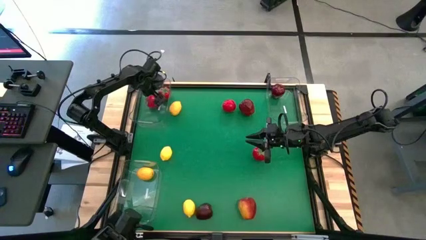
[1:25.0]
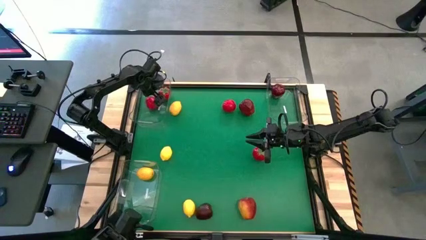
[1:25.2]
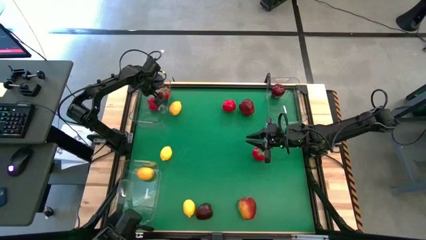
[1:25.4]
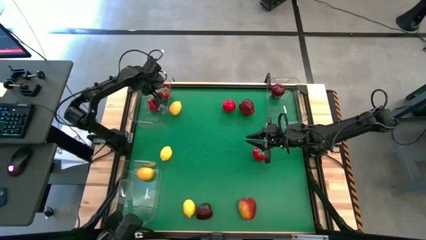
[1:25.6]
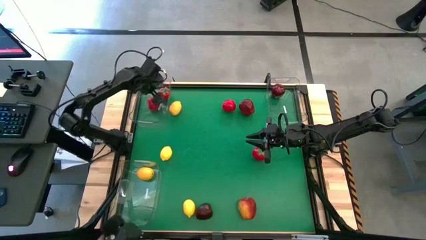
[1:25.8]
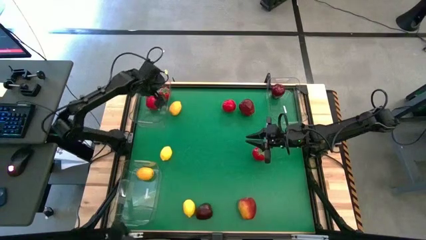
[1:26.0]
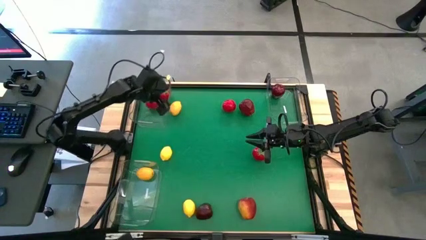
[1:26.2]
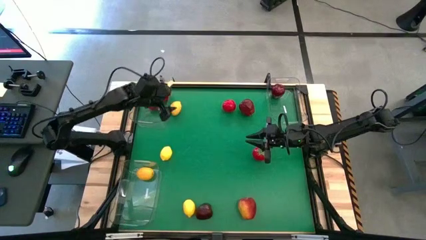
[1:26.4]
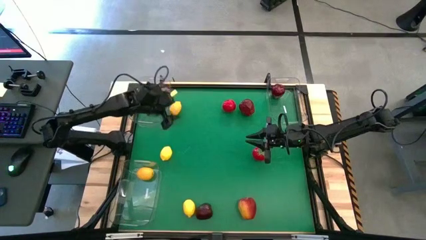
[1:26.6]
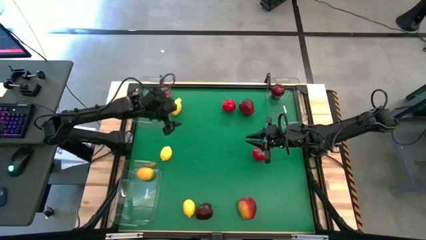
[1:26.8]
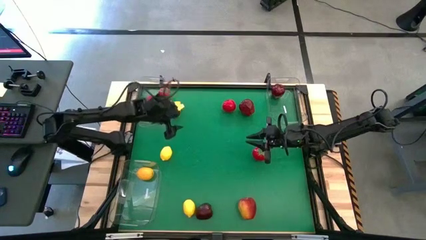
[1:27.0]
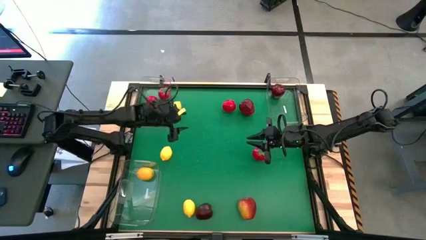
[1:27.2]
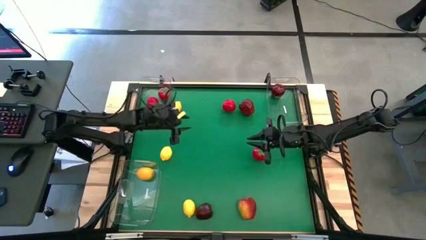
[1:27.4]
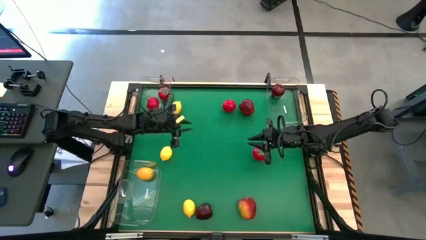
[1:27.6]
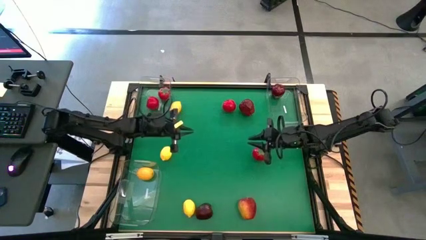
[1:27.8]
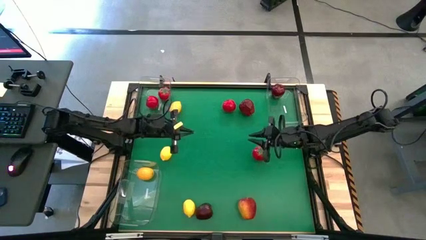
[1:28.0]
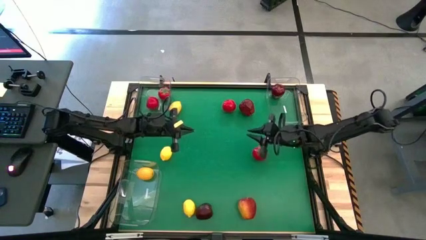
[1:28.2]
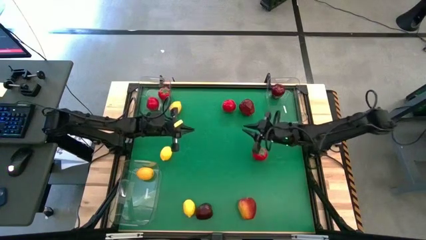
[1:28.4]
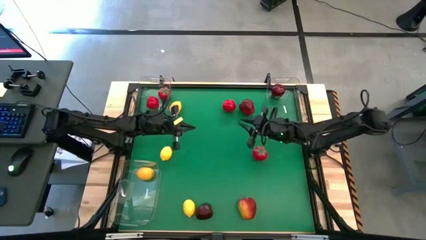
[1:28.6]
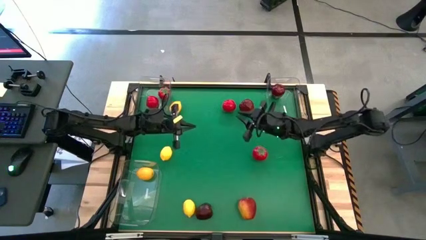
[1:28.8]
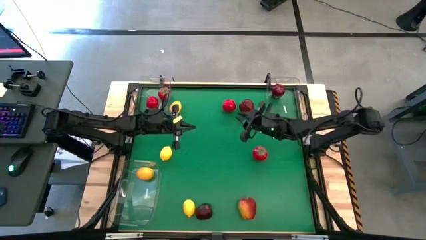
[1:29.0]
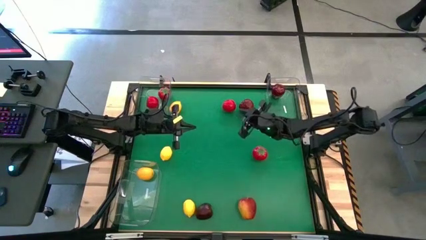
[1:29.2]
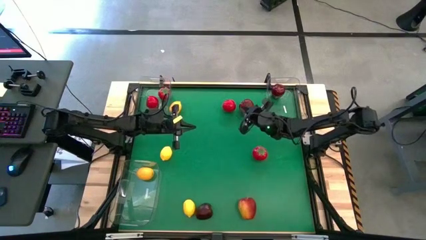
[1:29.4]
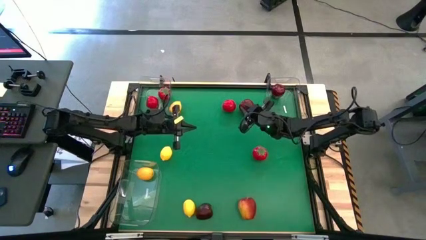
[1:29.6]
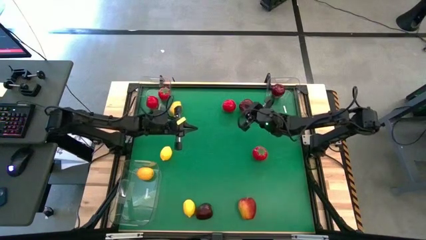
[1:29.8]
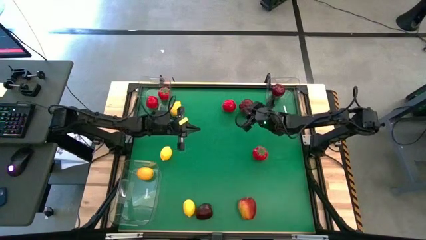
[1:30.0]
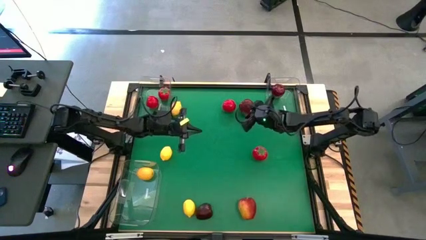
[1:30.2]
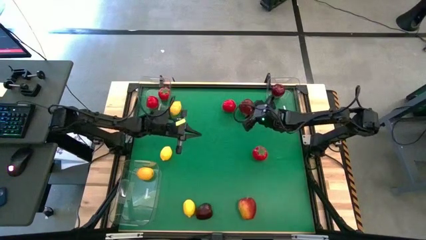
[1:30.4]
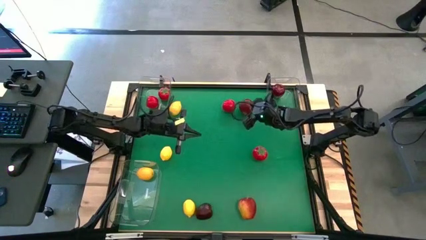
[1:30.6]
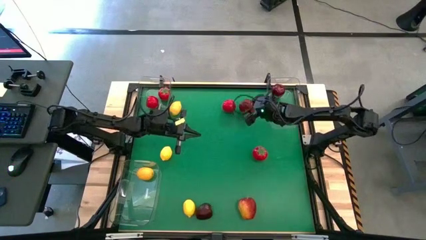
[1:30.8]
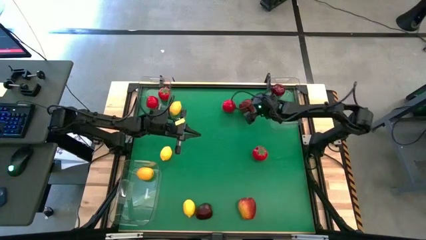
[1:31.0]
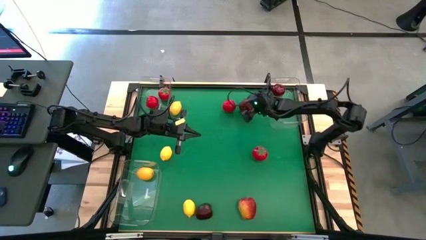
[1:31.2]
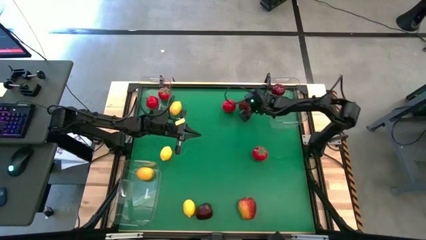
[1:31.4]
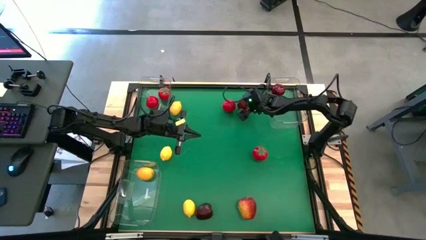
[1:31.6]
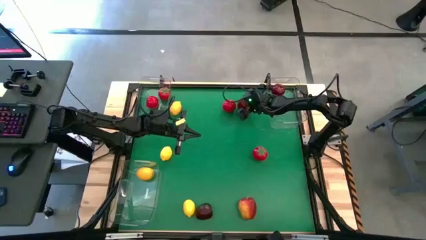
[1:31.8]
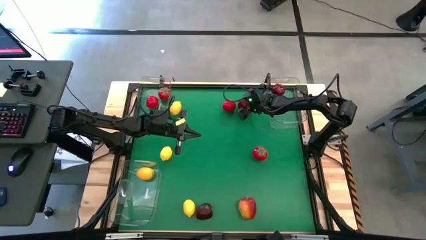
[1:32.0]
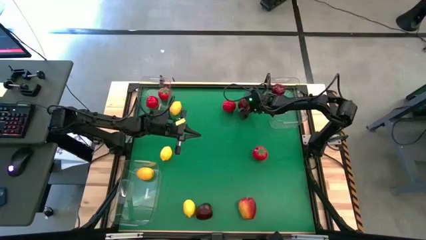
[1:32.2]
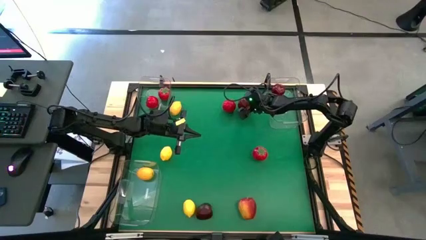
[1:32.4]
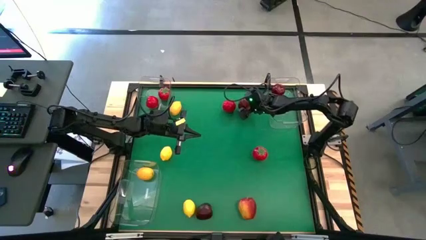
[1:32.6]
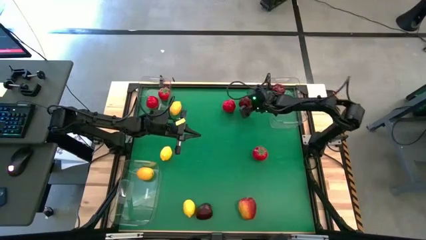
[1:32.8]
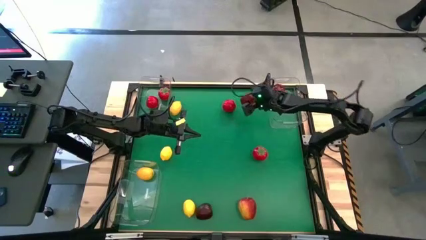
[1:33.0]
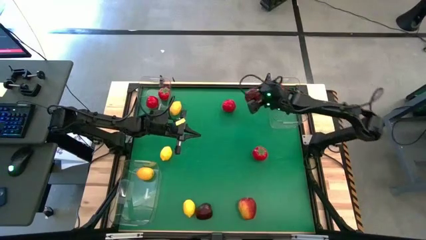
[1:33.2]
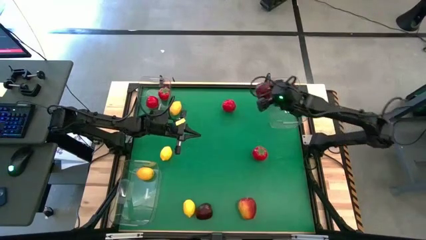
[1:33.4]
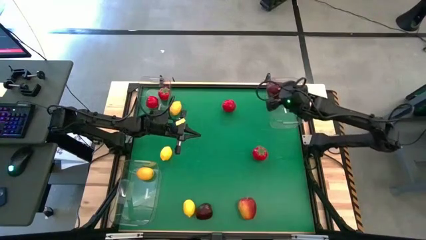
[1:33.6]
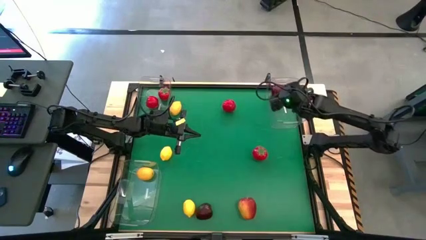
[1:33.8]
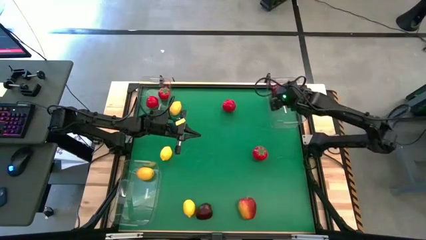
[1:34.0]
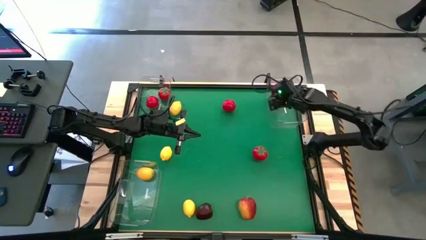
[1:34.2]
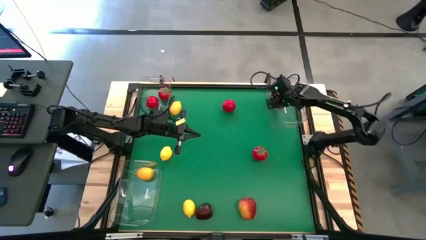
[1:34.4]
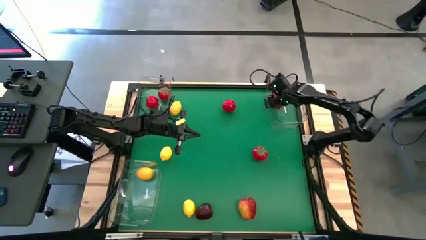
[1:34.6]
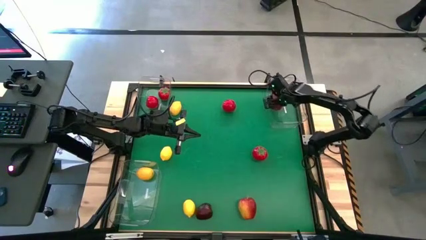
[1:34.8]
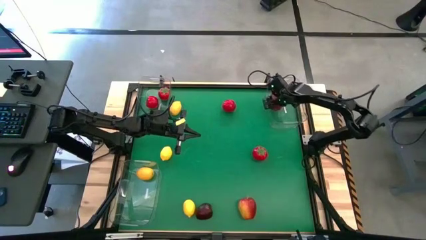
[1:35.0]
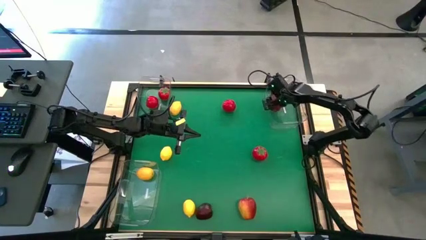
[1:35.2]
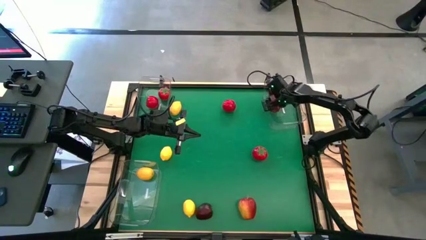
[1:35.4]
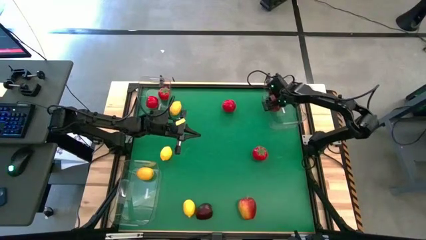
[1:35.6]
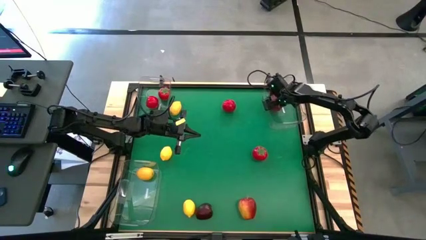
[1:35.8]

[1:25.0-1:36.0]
Task: Sort produce into baskets
Put the apple into the top right bin

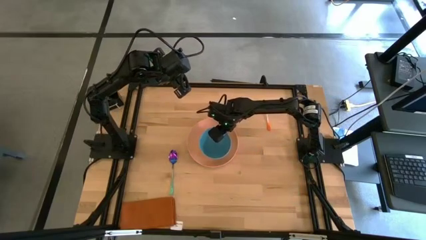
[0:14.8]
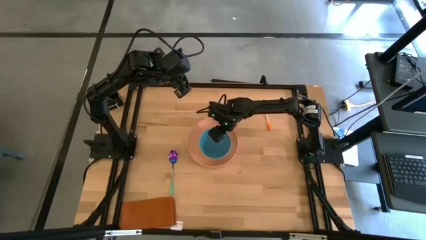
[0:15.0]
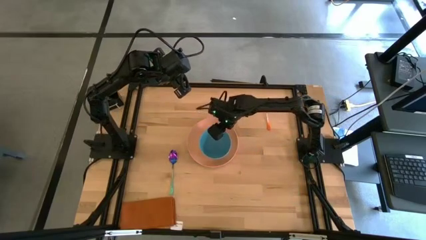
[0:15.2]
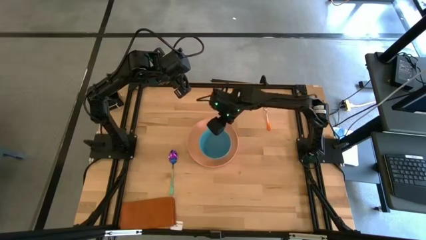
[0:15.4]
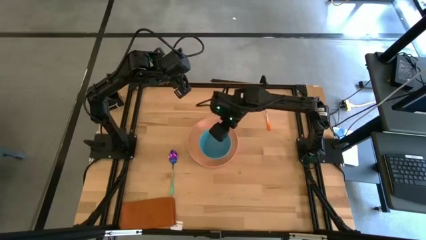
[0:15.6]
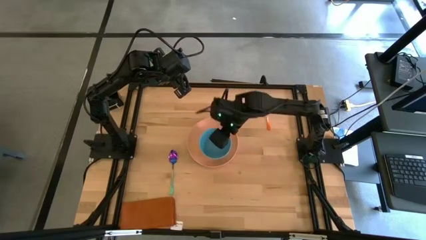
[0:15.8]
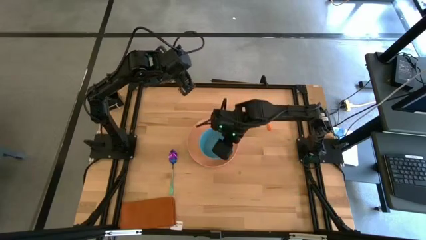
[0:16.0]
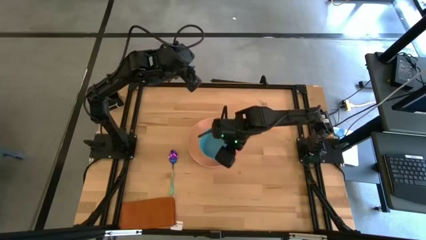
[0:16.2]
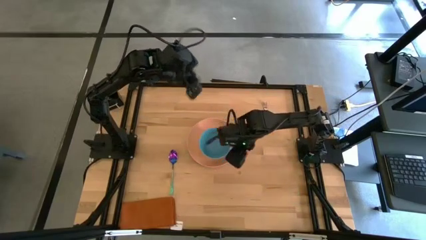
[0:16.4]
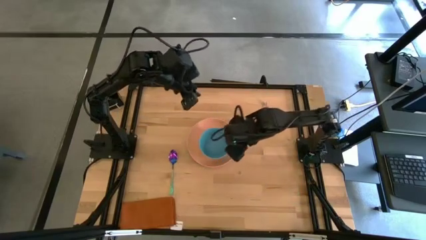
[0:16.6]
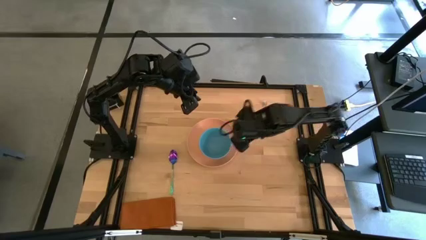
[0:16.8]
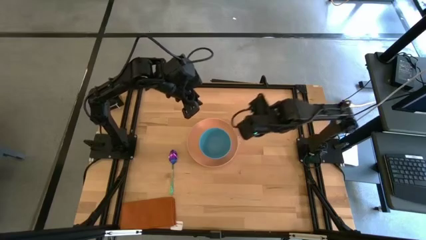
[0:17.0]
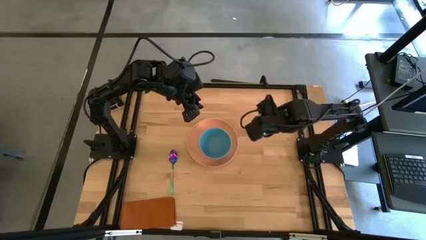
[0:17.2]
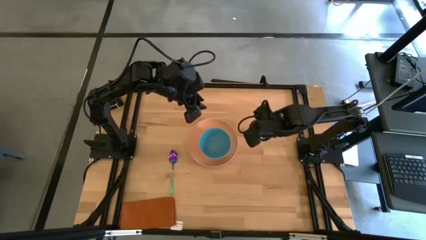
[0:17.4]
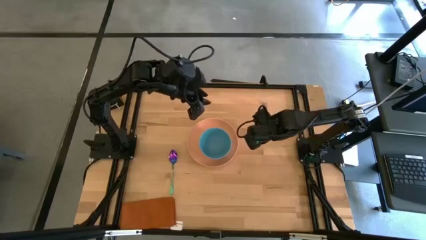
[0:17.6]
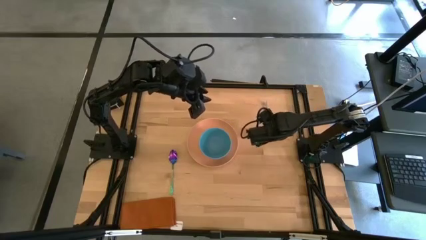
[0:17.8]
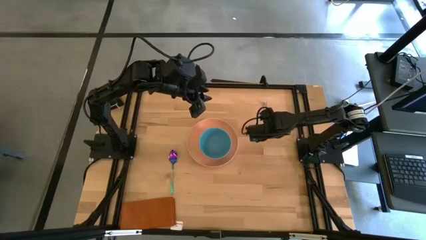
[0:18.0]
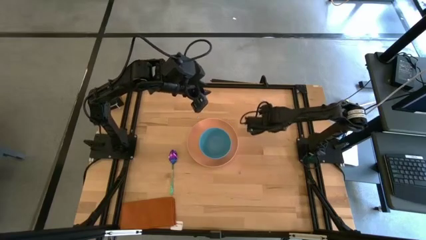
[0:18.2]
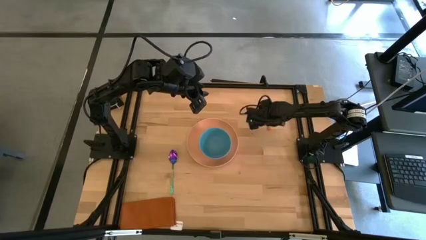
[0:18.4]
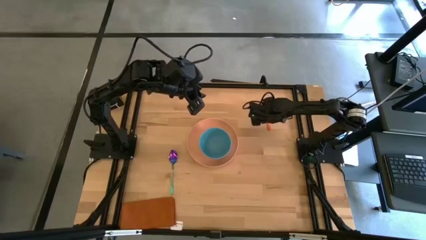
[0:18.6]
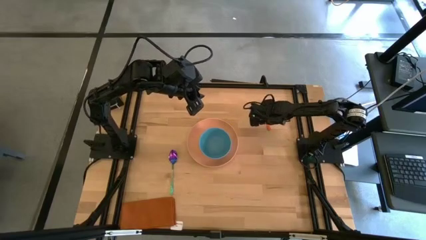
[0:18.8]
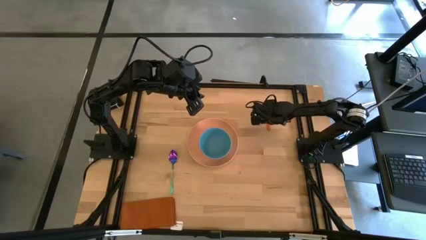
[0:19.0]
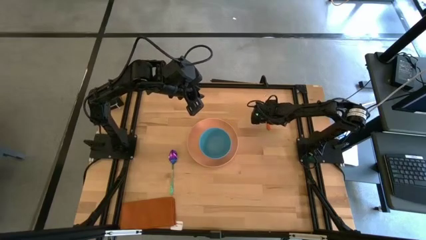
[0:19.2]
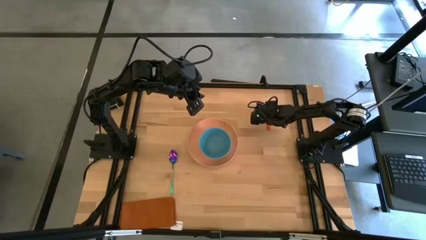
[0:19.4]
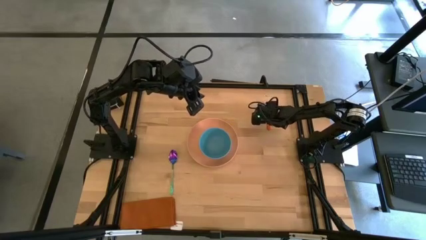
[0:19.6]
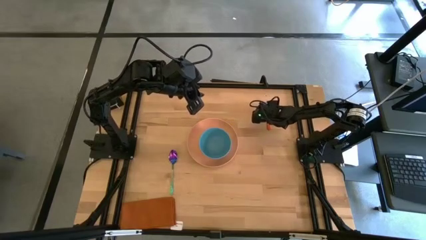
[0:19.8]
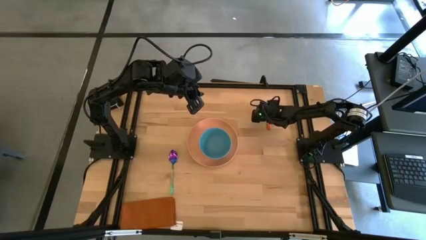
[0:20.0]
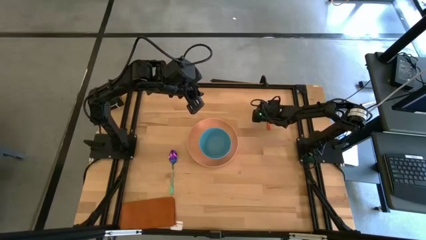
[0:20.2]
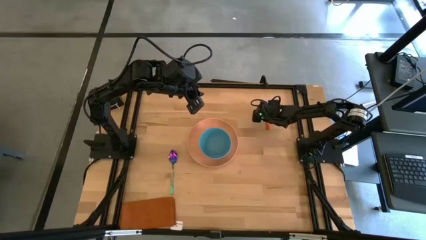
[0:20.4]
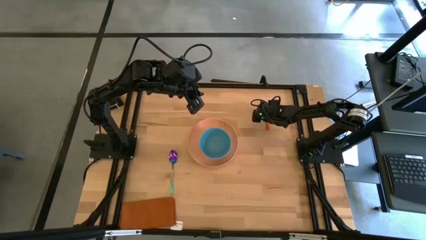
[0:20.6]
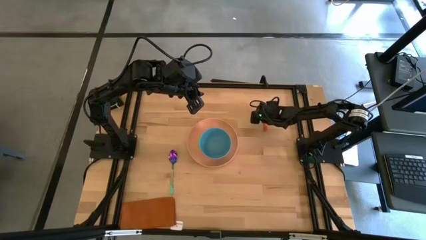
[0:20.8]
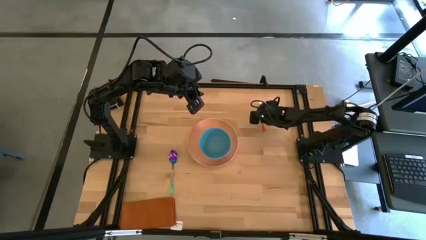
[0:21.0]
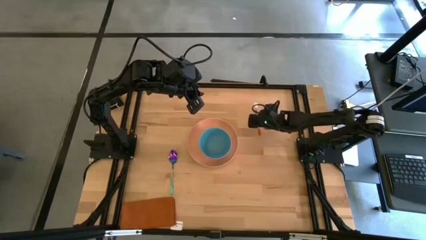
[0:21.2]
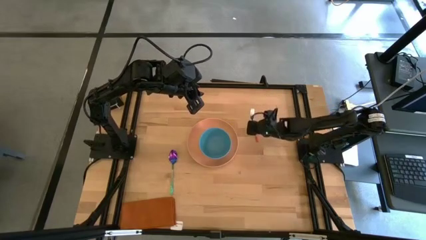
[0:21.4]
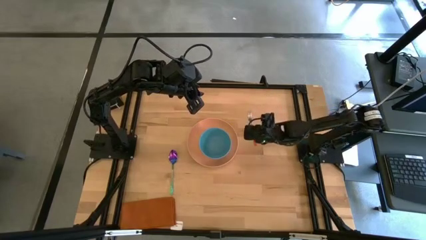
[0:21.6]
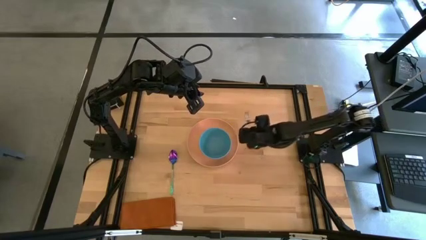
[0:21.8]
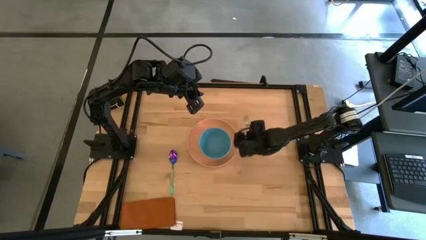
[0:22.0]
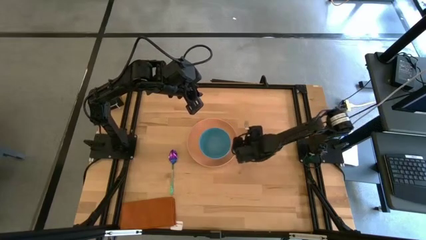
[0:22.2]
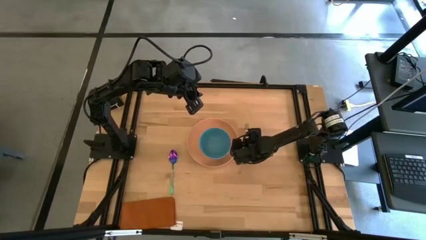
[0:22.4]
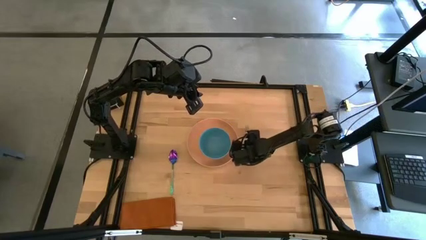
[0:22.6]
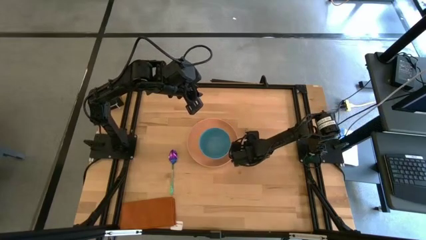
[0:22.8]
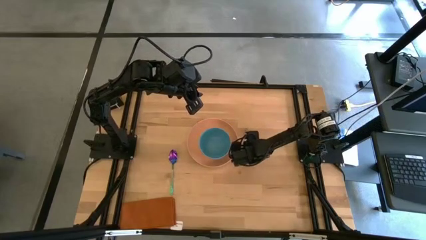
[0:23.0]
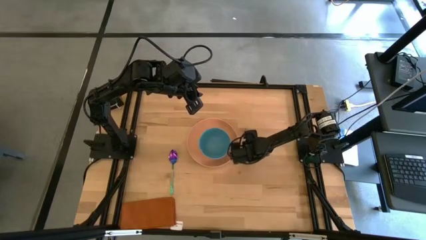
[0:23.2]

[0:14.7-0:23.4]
Task: Set table place
Put the orange fork to the right of the orange plate
